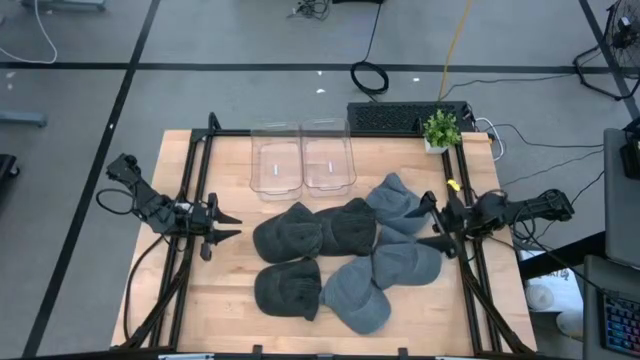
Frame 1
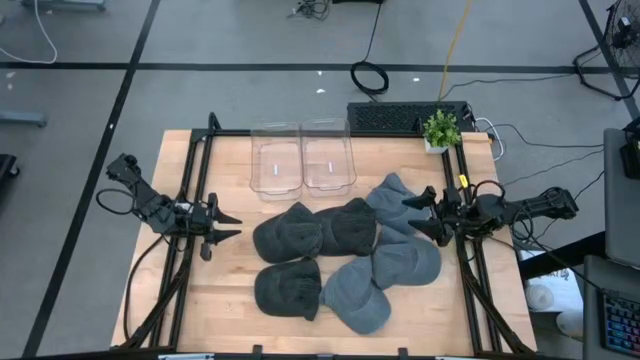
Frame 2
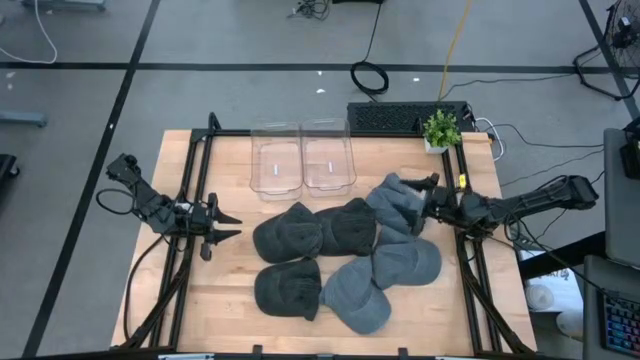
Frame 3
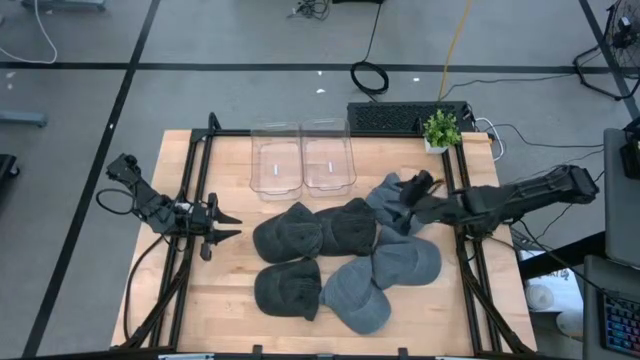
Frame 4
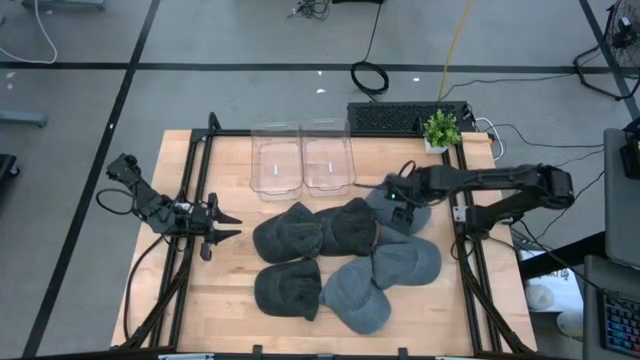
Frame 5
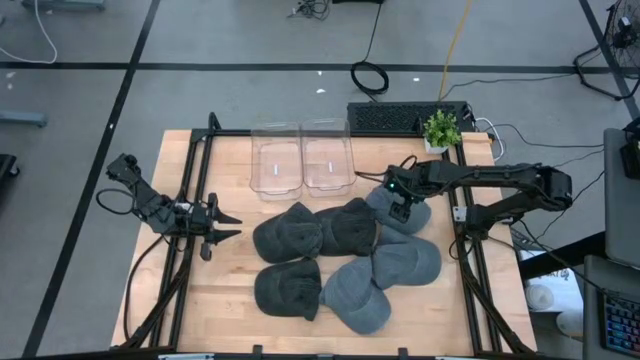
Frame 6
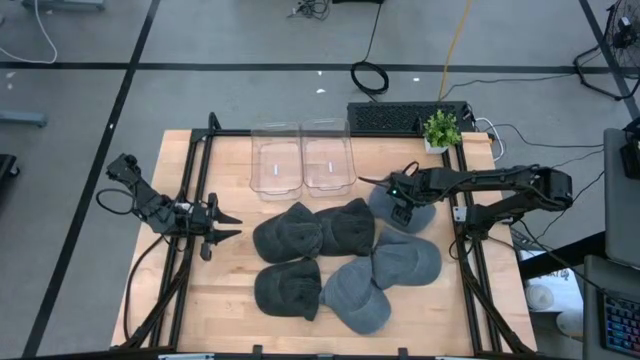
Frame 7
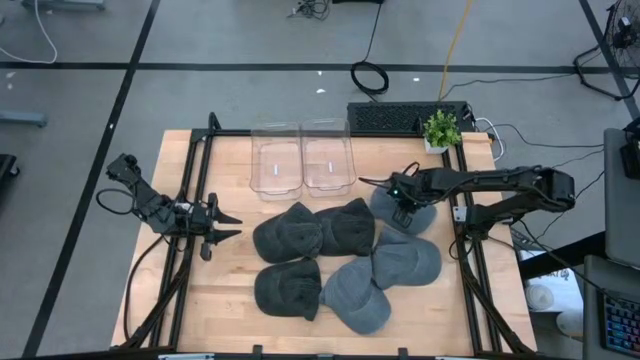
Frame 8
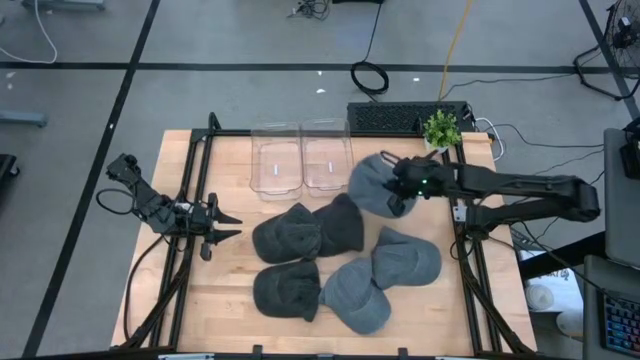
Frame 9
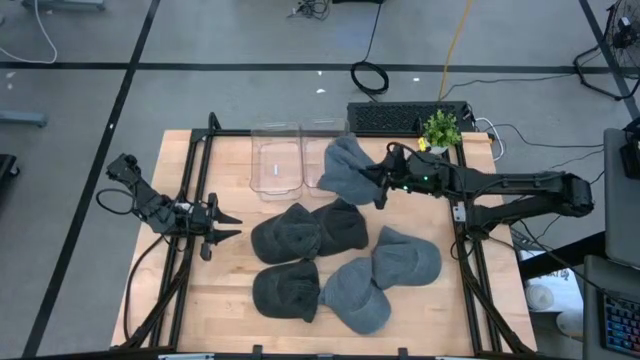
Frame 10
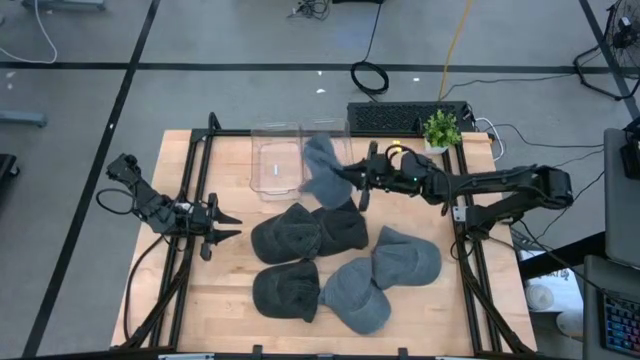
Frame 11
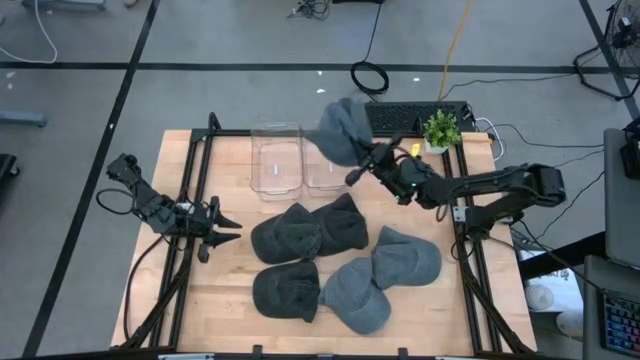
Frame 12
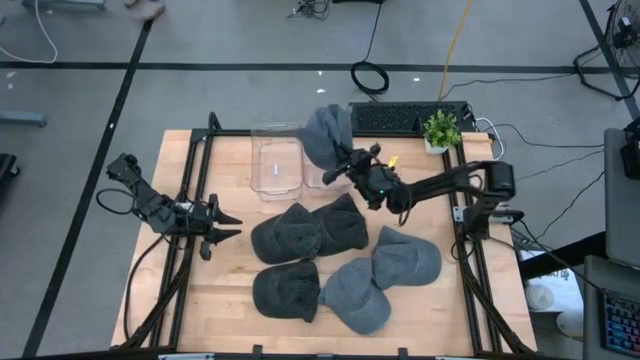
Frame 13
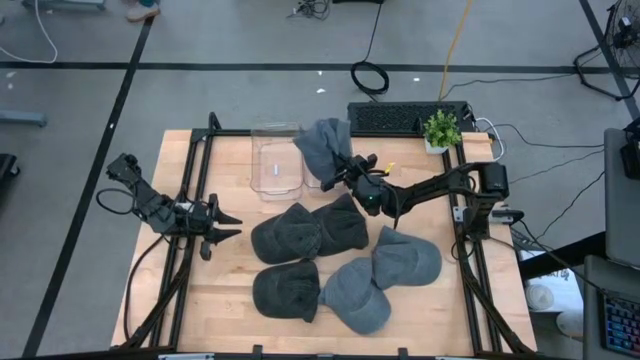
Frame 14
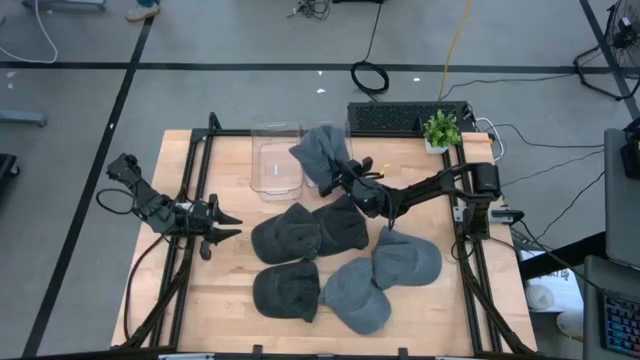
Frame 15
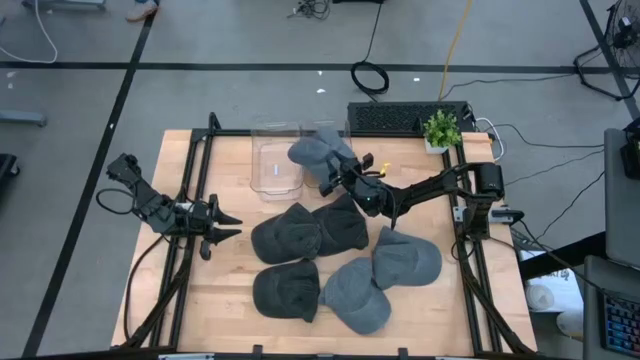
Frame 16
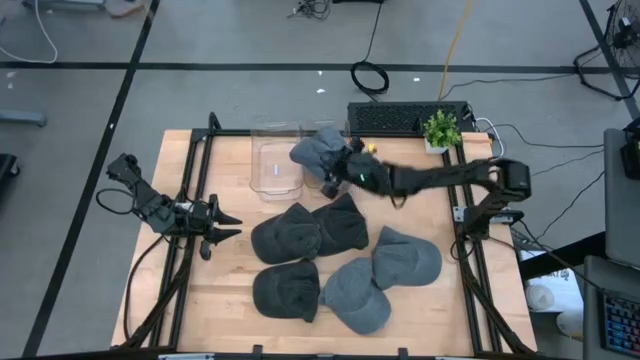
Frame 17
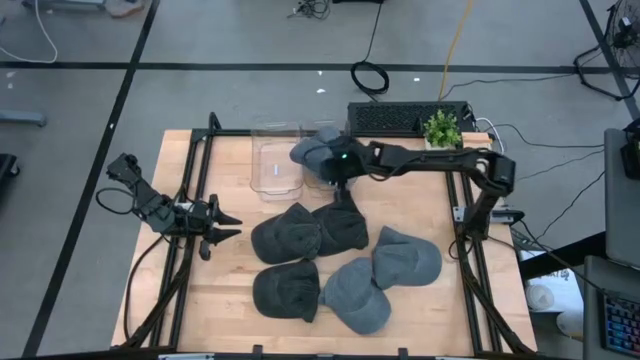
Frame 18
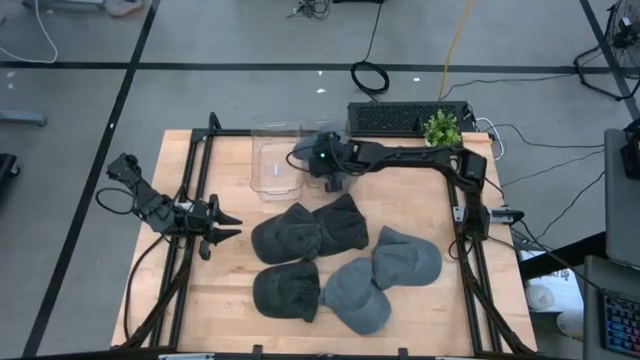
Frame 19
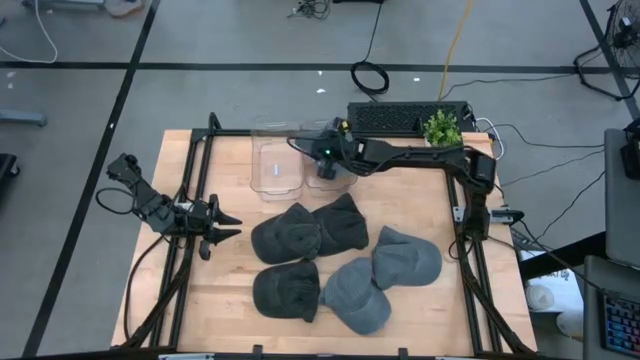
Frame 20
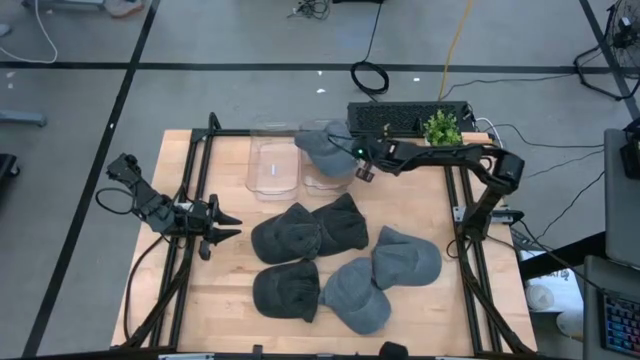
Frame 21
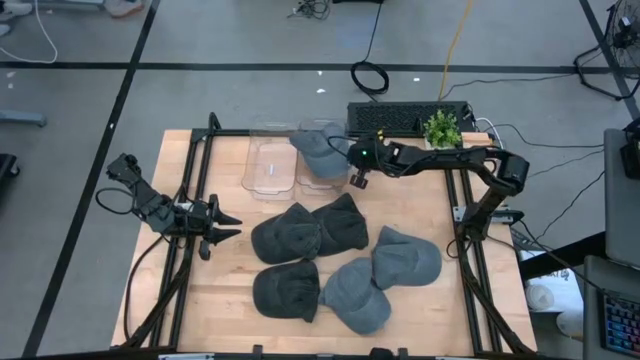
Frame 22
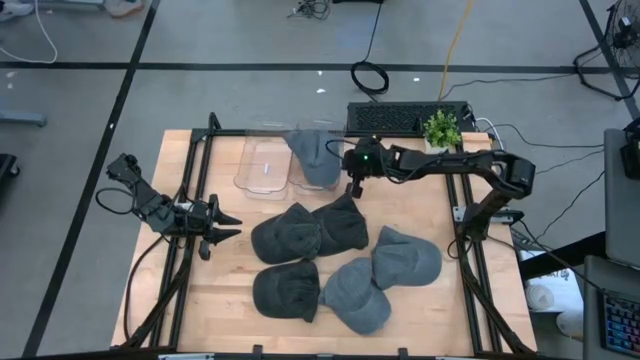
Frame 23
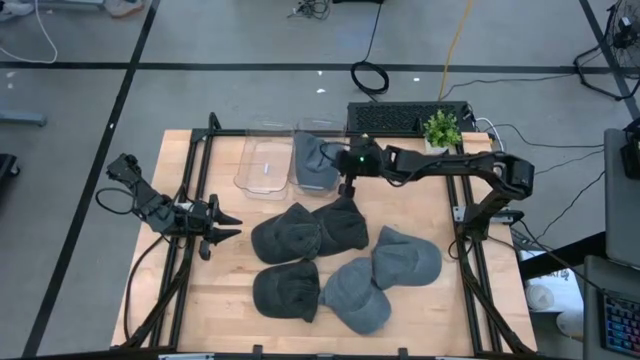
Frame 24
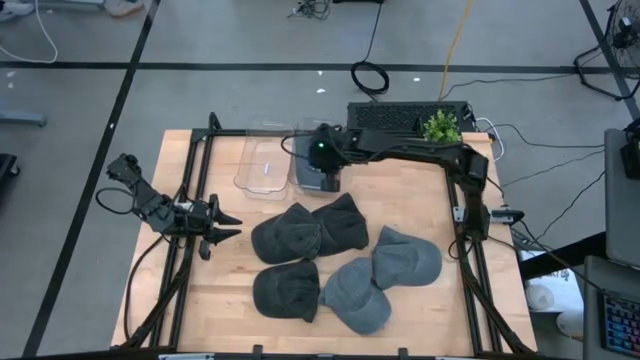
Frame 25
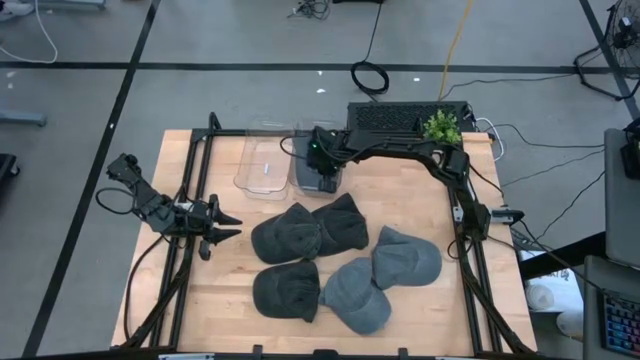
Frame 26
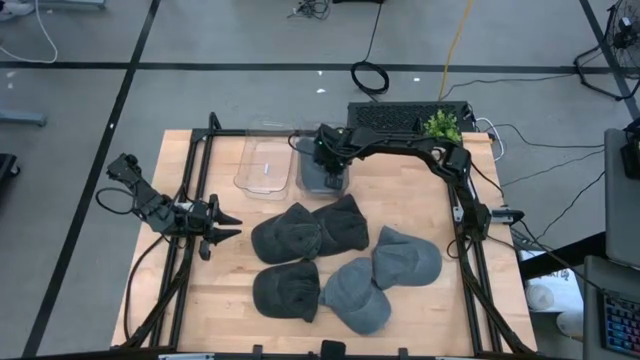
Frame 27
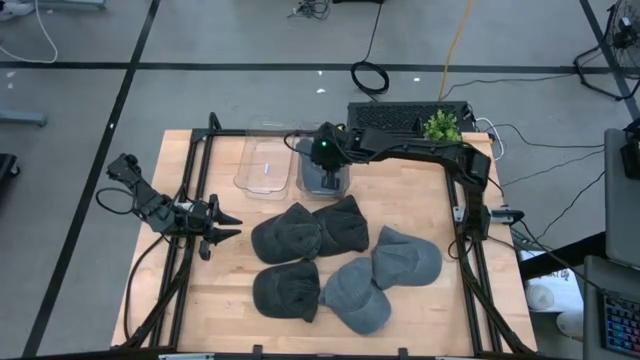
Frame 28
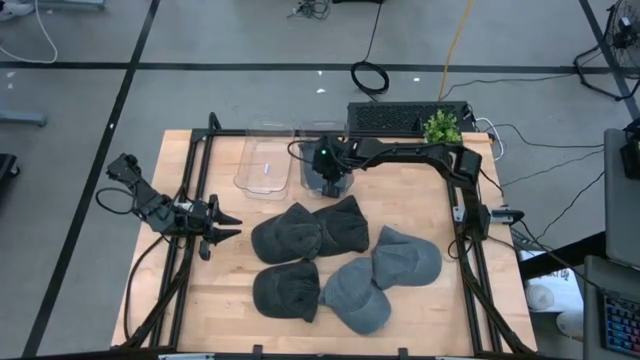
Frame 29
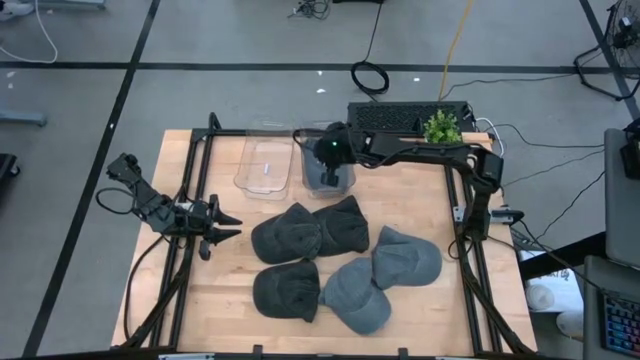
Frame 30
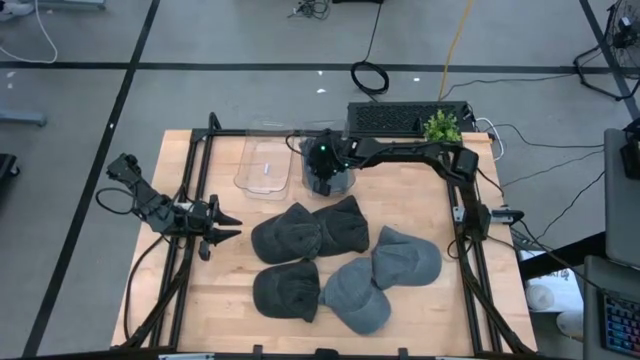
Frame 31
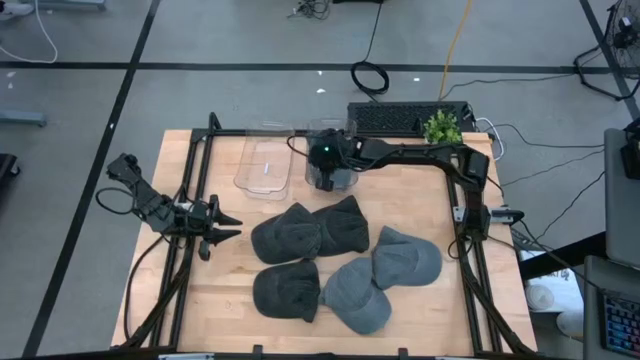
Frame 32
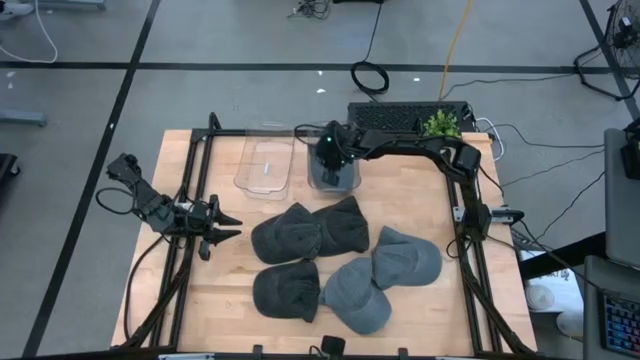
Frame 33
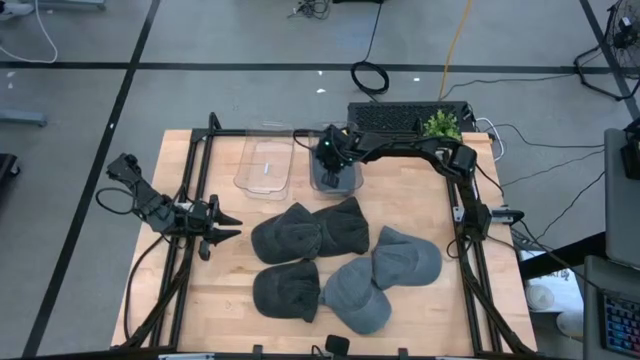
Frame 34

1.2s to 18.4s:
Task: Pick & Place hat
Put the top blue cap into the right transparent bin
